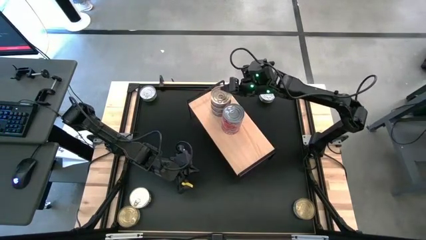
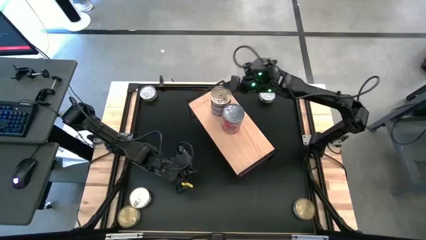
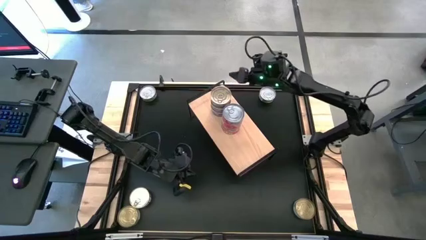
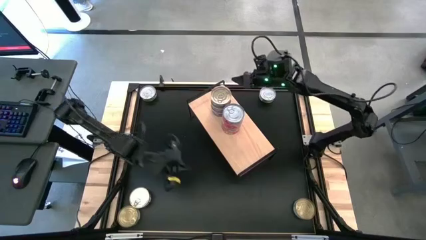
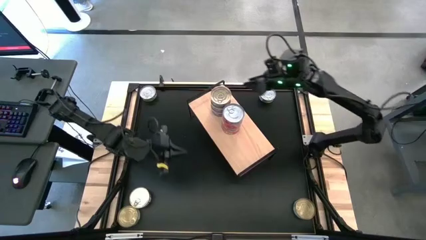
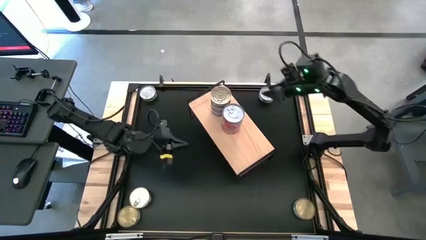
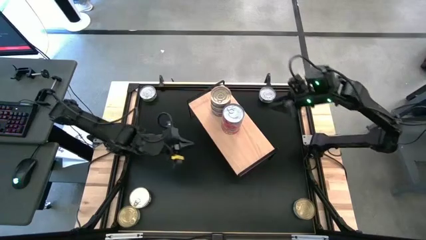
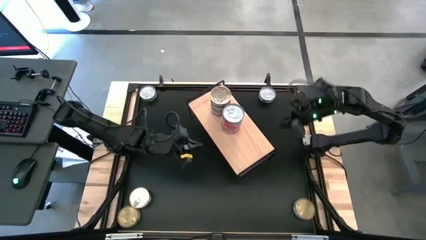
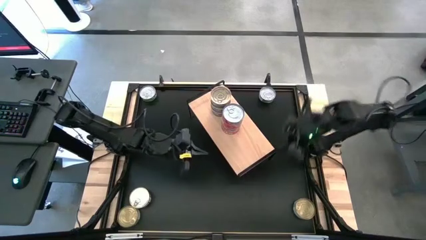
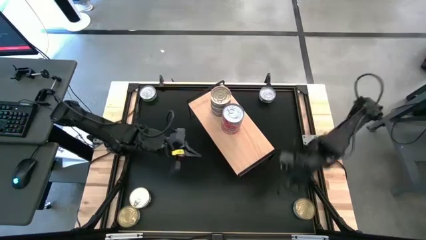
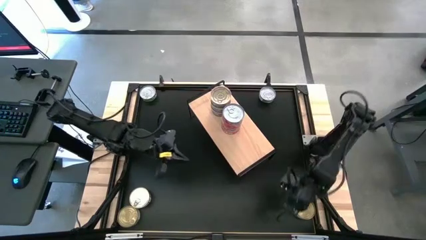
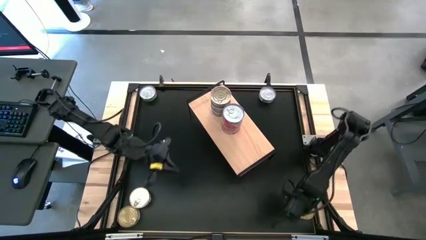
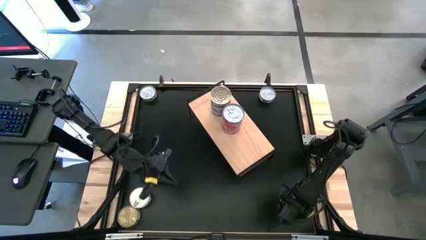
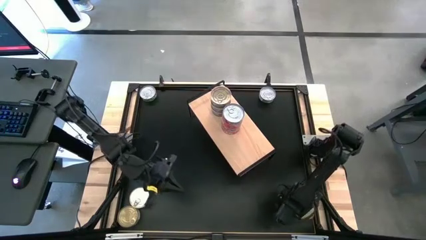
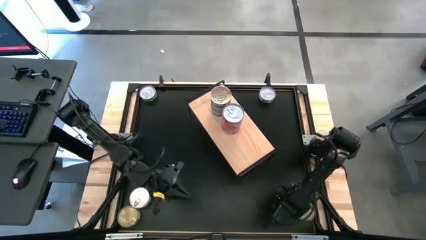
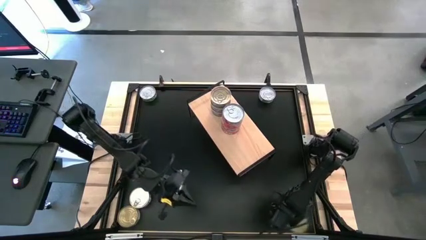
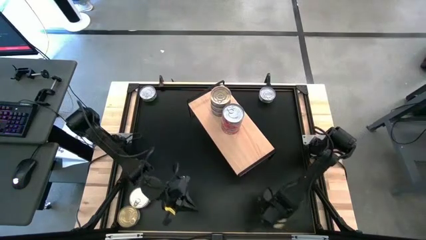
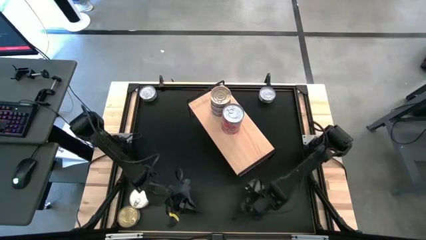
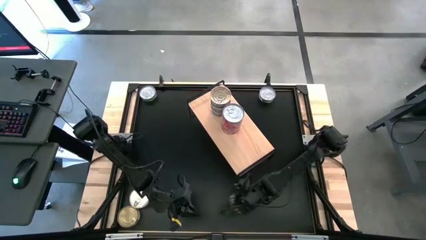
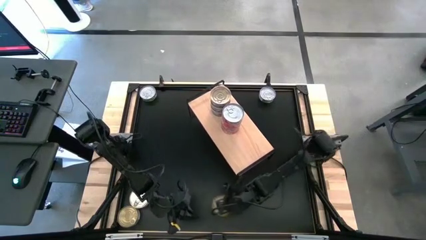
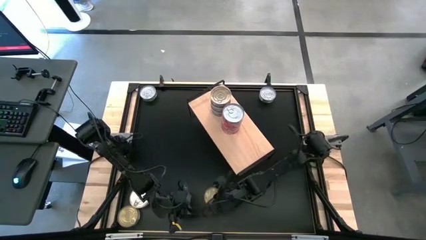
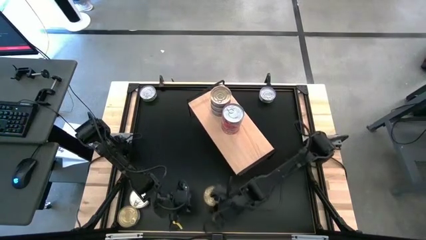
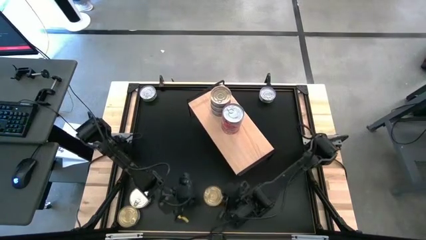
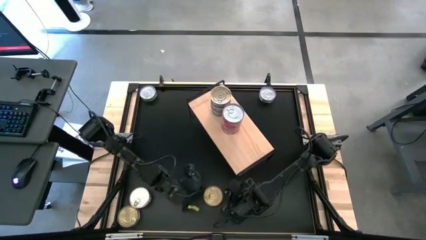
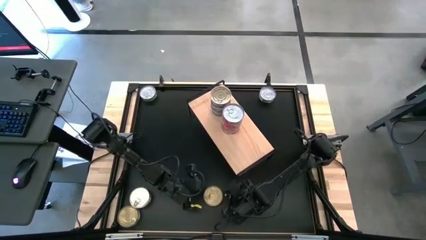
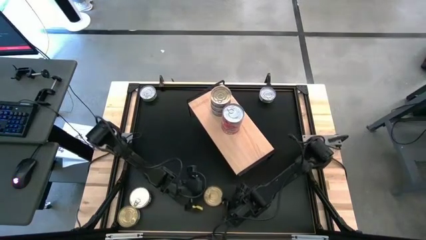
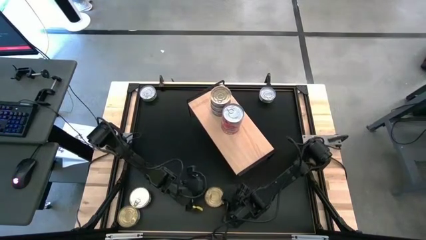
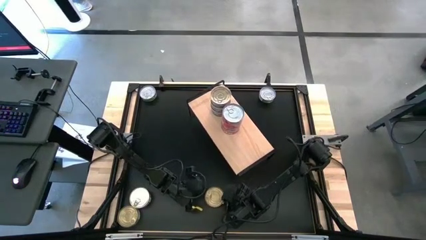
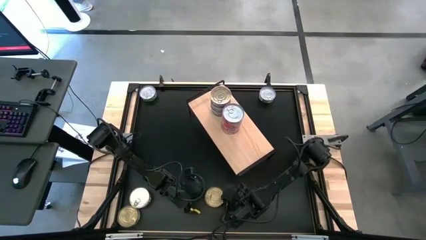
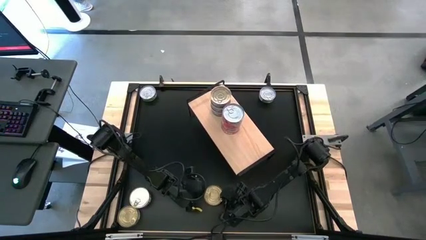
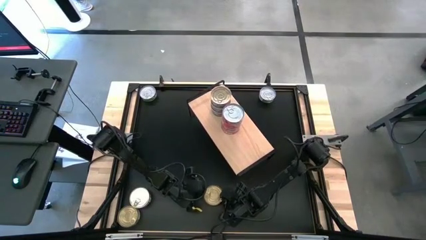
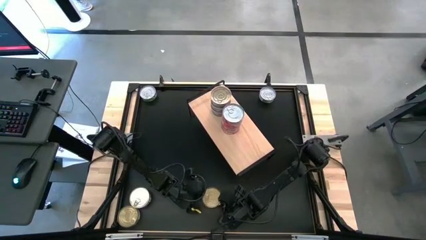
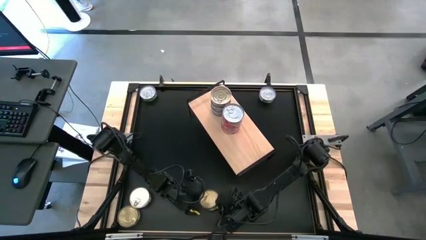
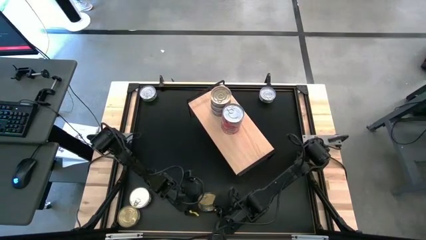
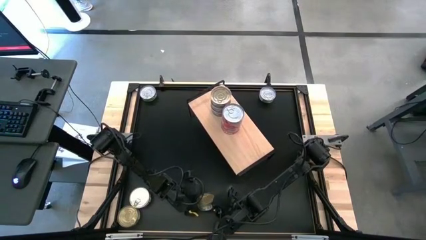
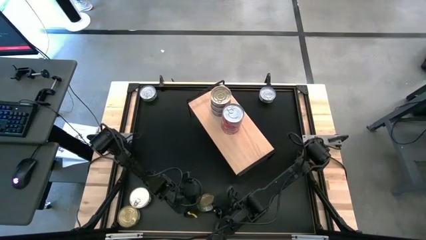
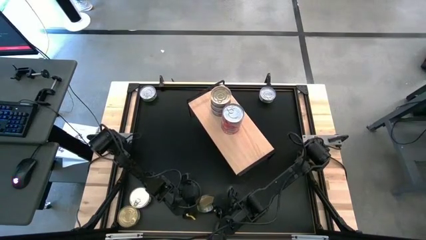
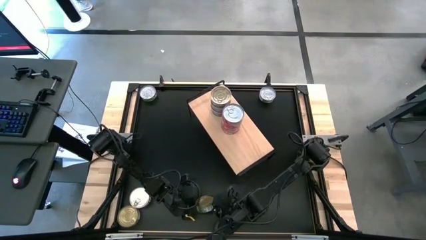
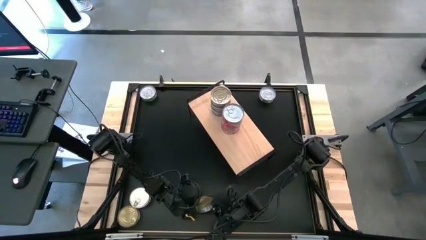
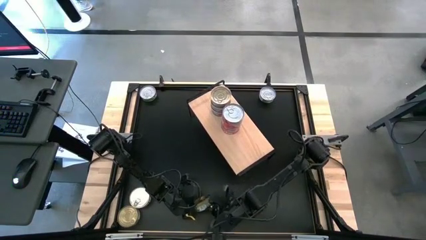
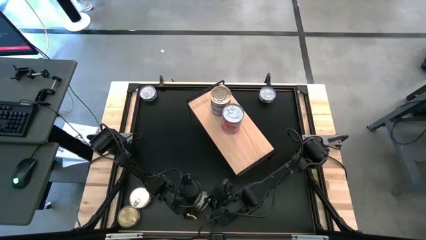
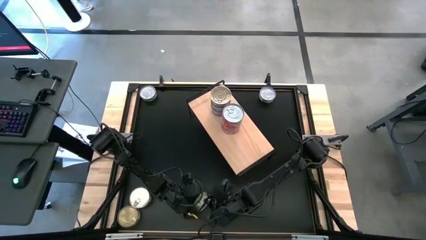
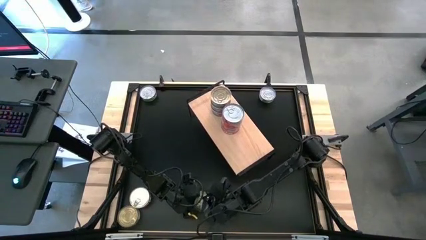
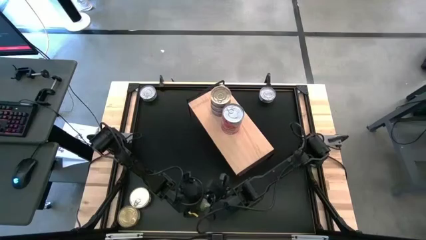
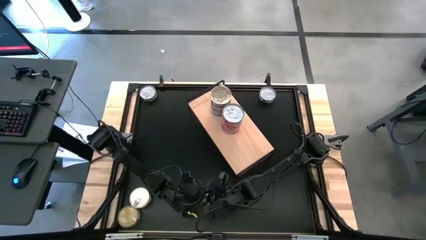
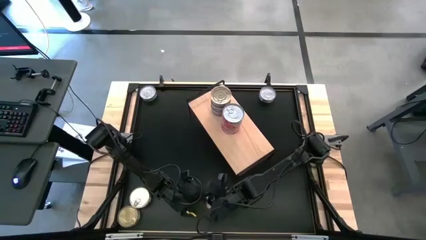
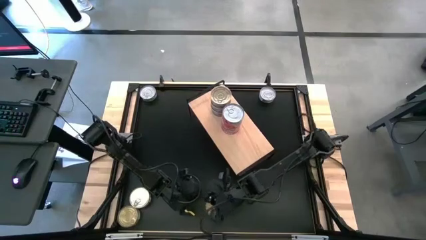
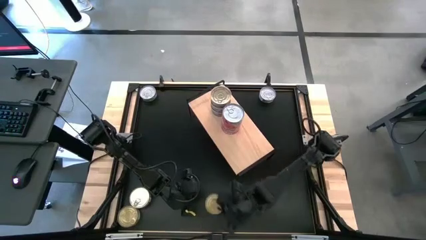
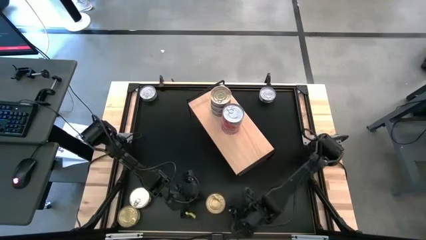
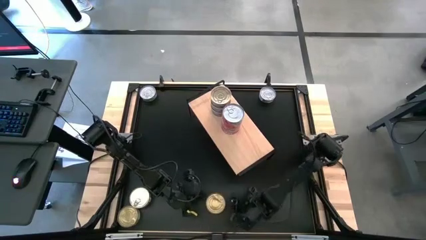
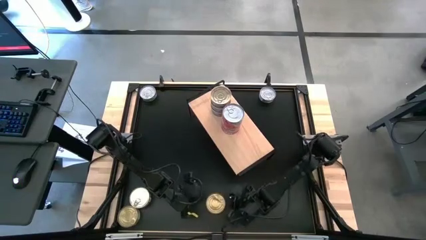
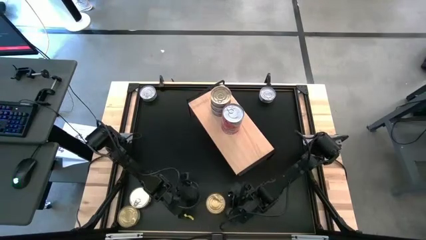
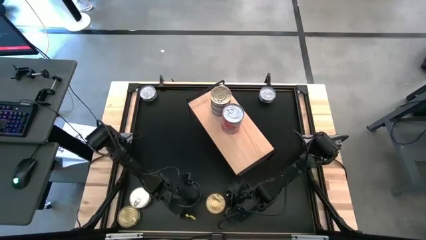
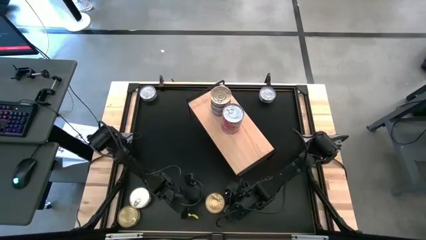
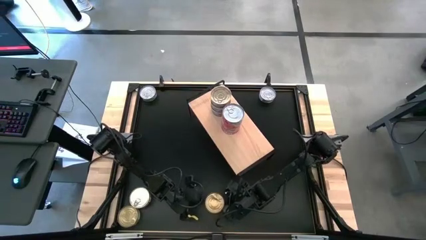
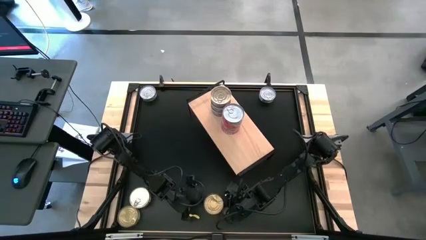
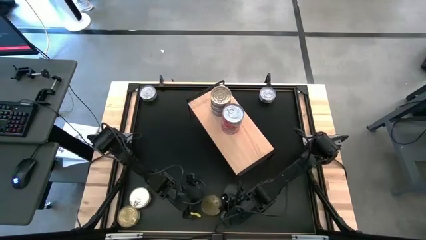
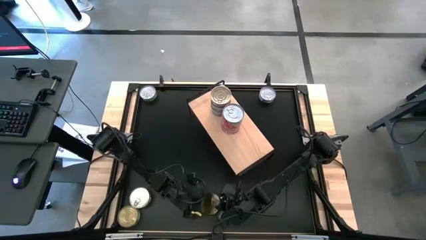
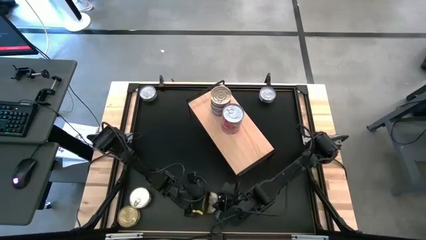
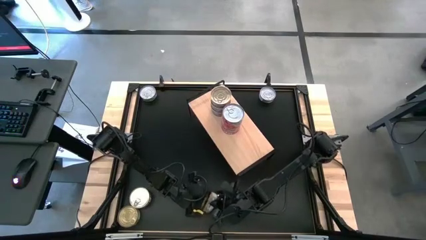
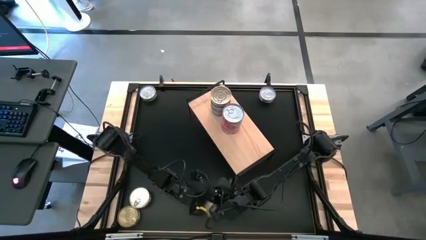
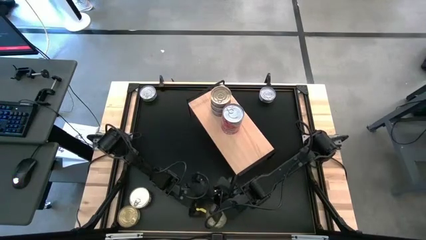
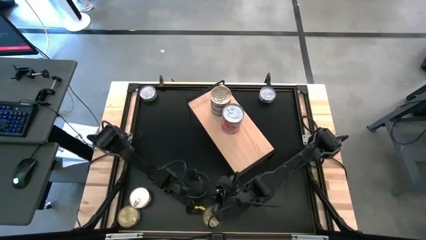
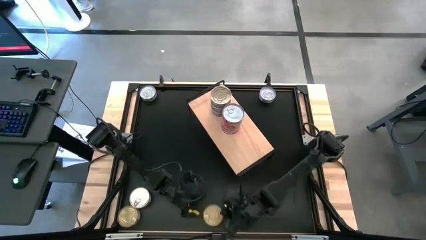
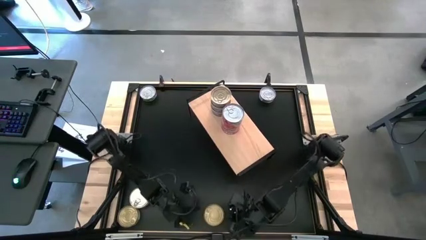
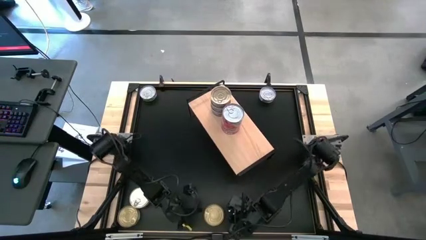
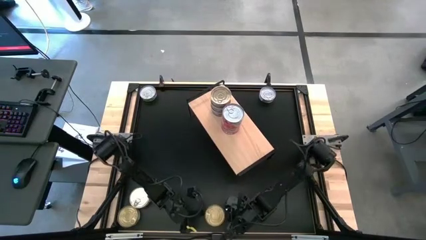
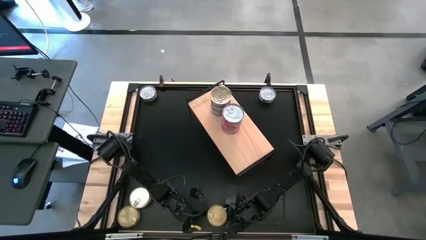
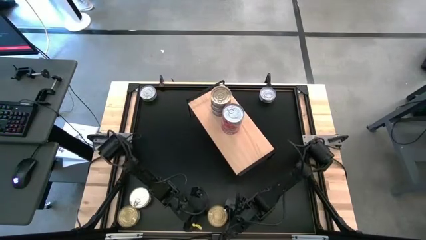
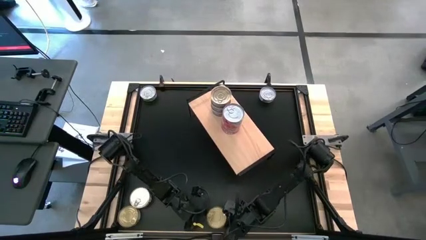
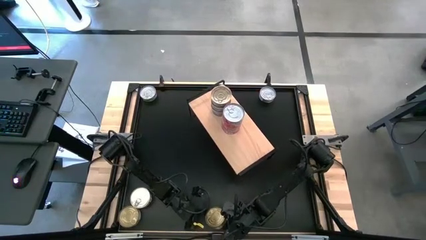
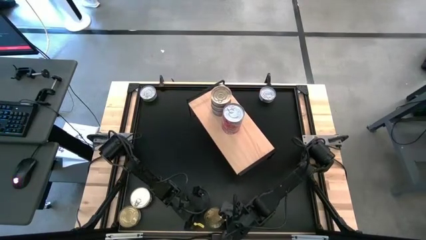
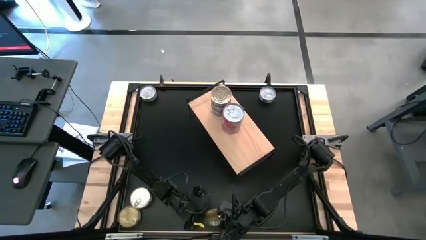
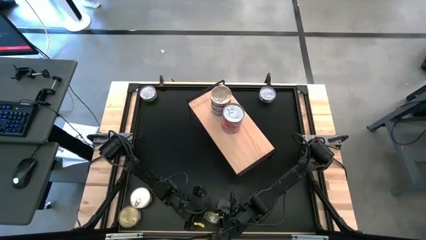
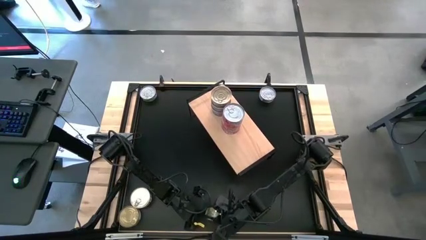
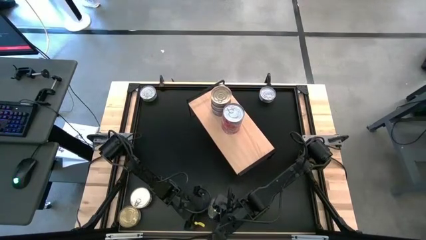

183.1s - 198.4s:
Task: Stack canned seafood by type on shelf
Put the green tuna can on the shelf
